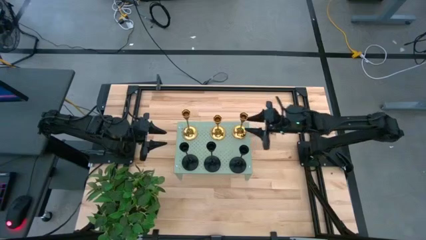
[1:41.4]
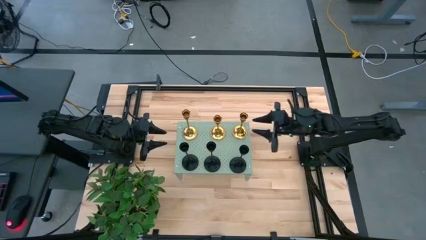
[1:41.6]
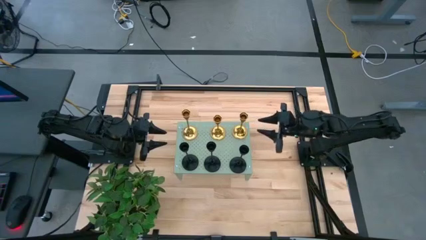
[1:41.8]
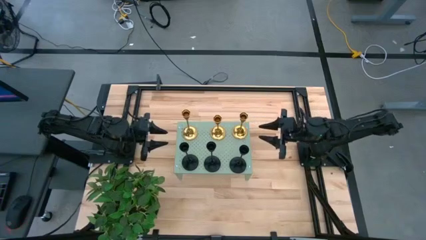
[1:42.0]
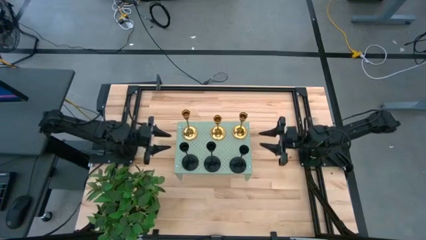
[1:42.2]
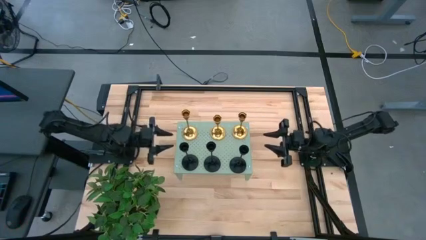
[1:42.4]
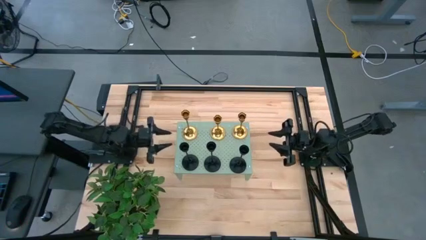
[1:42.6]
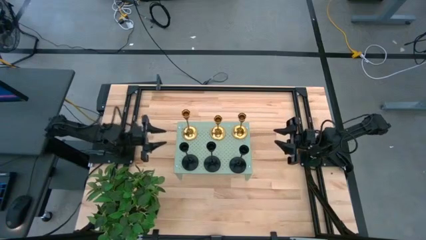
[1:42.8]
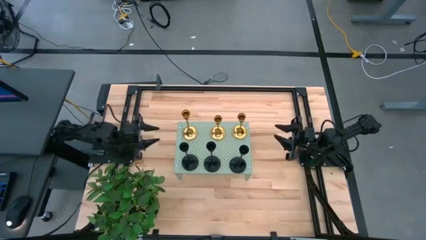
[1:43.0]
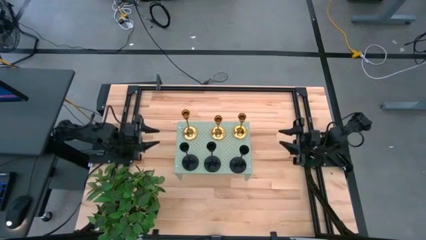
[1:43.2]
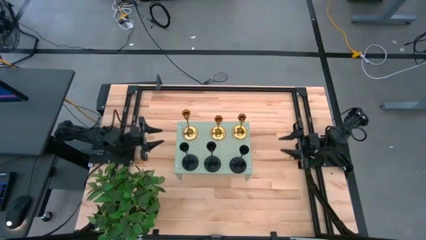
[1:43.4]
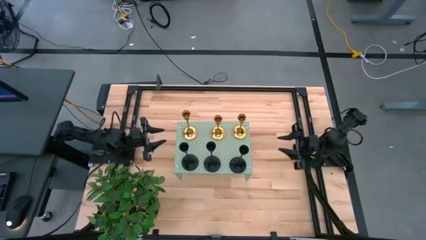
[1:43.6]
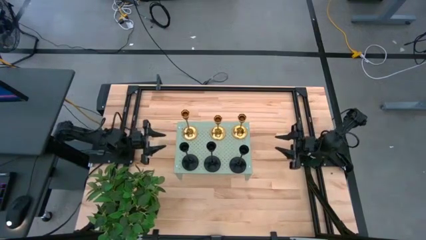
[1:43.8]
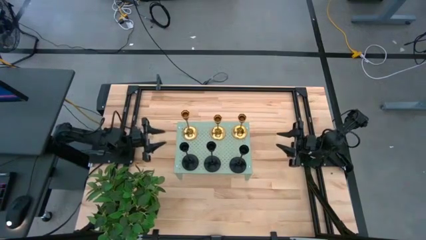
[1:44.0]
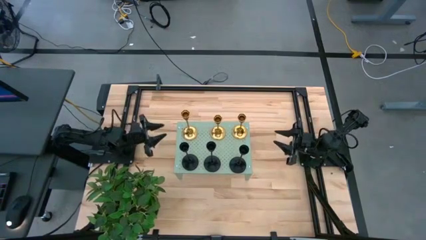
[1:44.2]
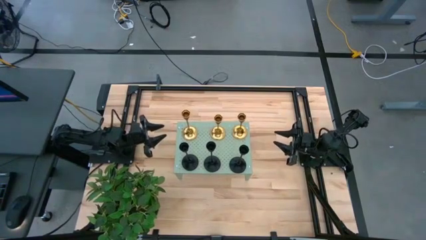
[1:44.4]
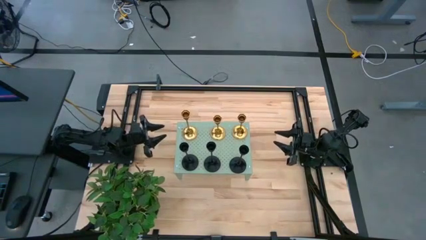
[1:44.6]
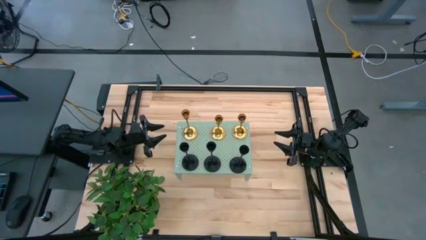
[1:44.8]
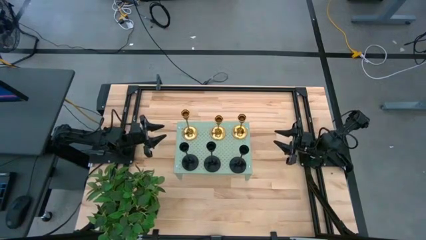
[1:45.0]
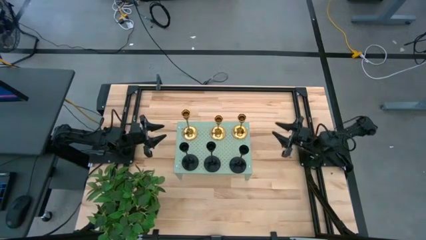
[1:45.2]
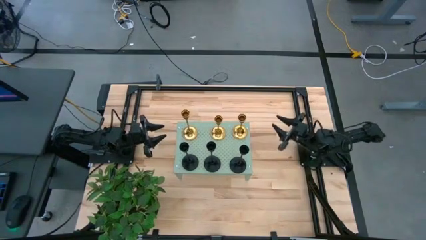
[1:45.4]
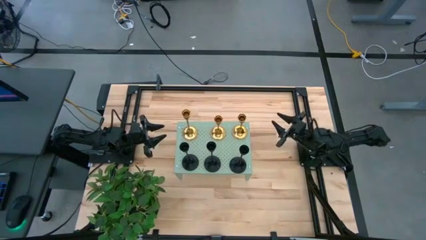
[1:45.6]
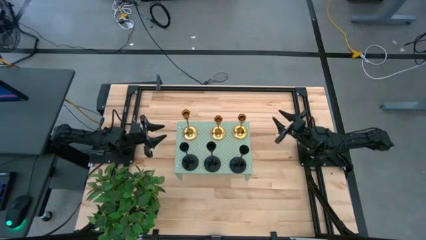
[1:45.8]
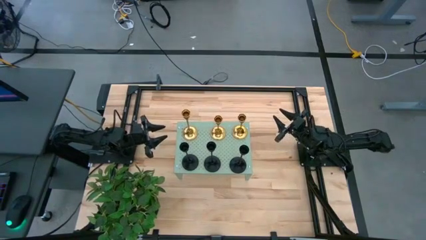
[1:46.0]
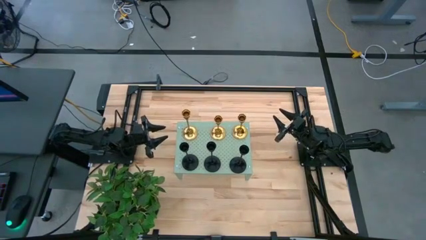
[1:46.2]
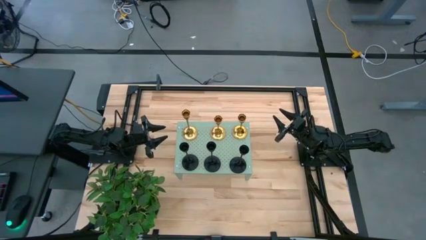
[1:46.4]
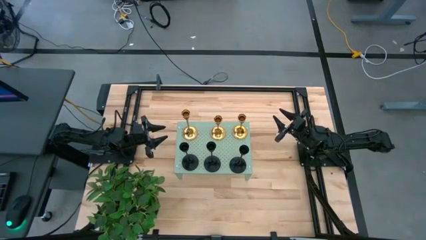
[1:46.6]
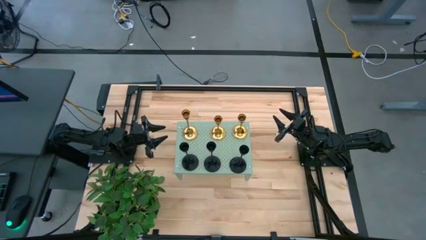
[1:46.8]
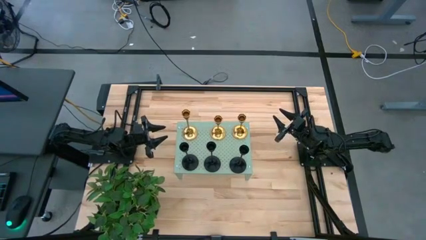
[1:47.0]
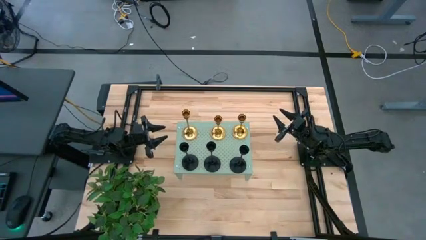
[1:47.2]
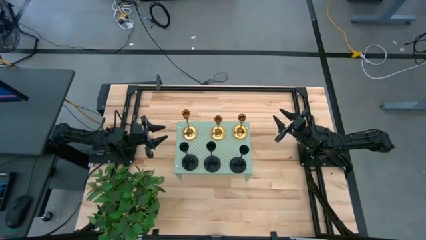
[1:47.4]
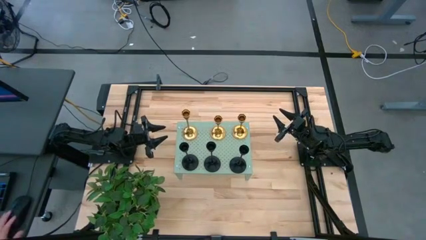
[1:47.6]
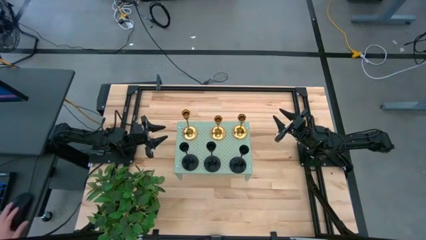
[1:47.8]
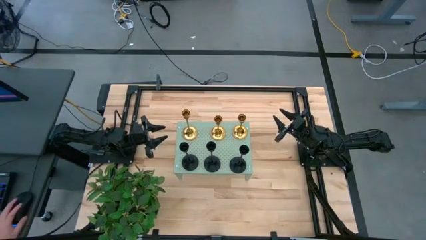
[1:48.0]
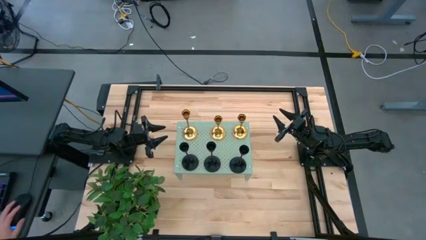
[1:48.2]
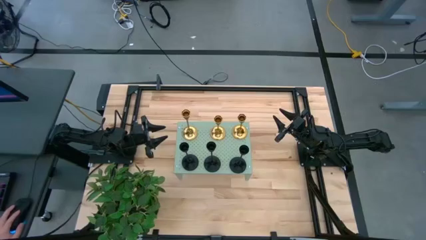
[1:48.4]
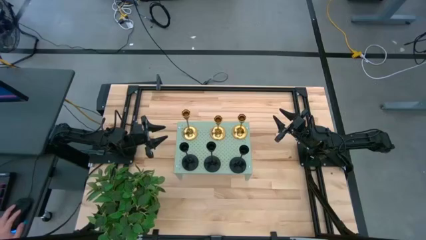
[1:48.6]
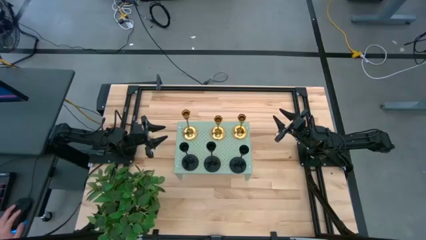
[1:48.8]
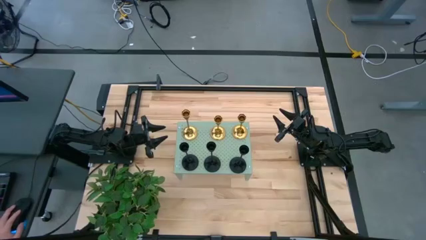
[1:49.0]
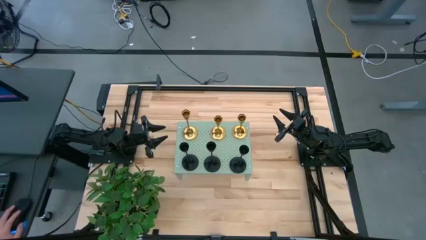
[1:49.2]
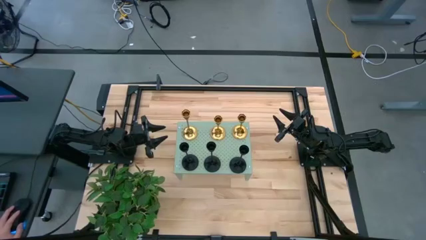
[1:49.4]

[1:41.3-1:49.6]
Task: Pick & Place candle stick holders
Return to Home Position

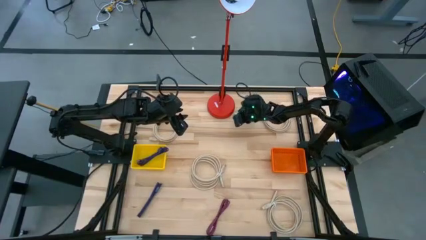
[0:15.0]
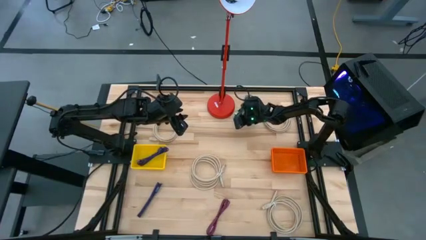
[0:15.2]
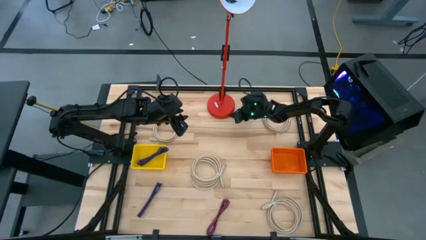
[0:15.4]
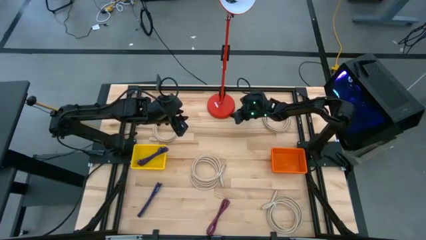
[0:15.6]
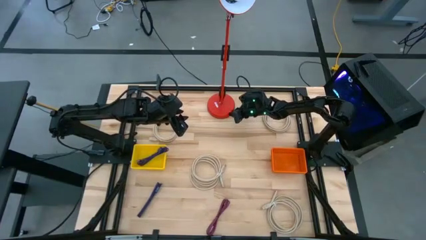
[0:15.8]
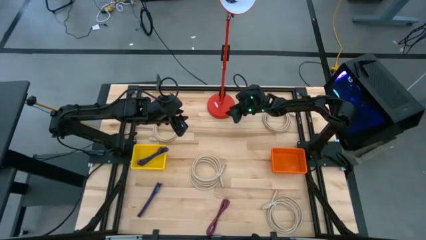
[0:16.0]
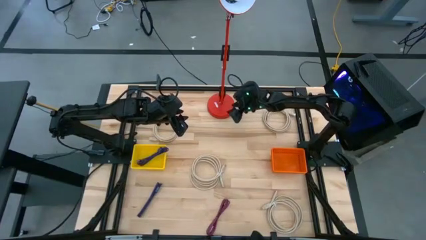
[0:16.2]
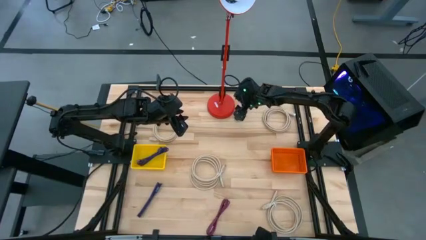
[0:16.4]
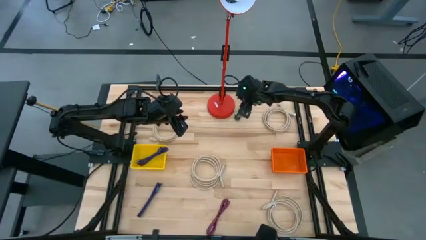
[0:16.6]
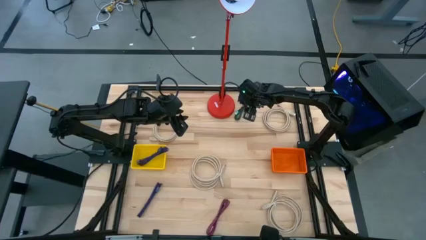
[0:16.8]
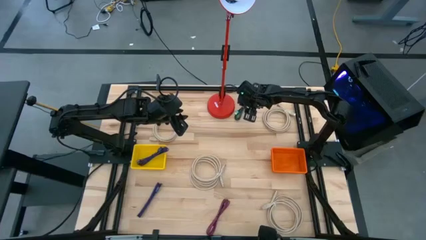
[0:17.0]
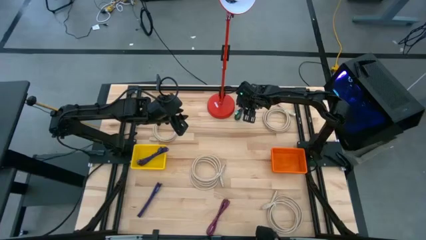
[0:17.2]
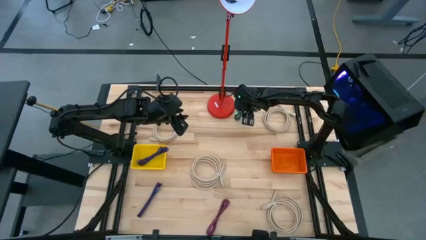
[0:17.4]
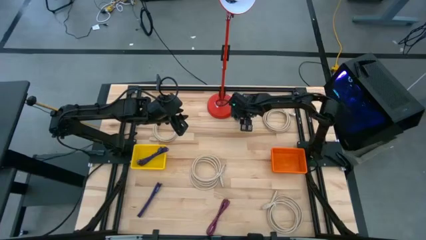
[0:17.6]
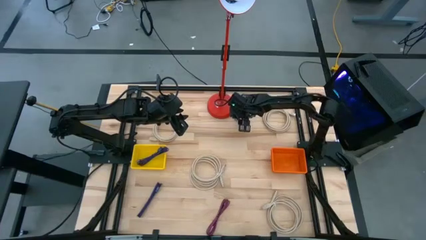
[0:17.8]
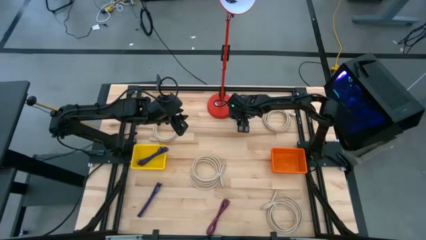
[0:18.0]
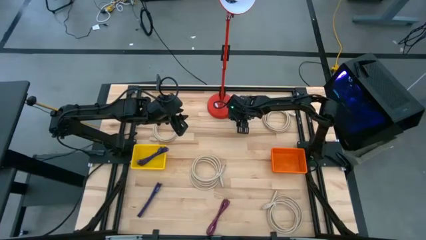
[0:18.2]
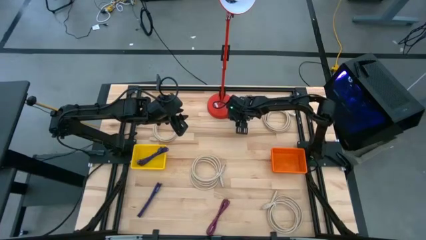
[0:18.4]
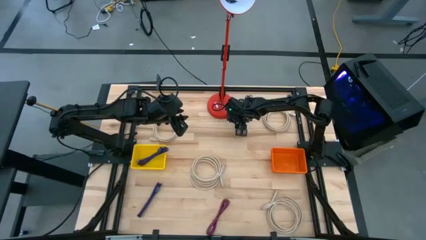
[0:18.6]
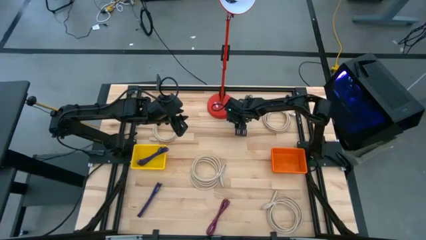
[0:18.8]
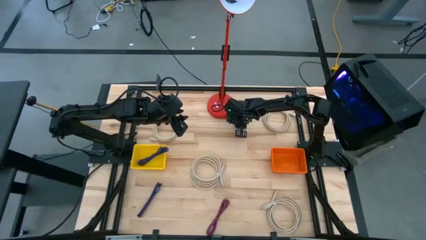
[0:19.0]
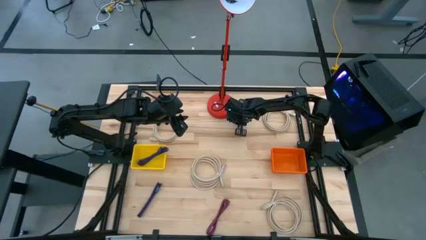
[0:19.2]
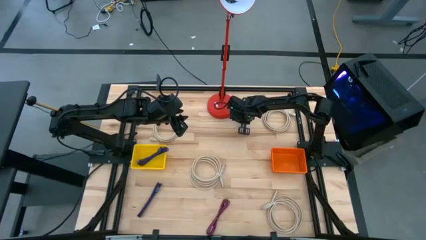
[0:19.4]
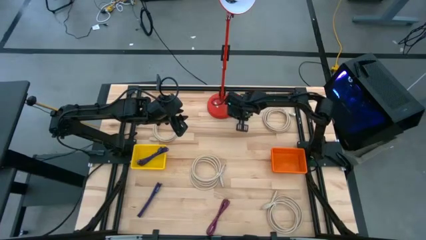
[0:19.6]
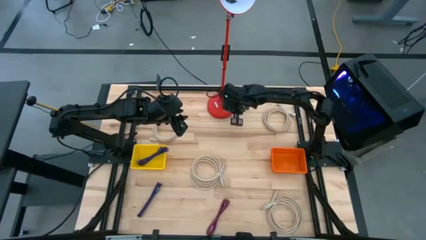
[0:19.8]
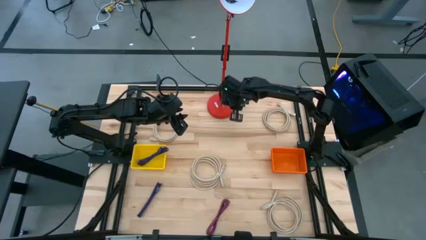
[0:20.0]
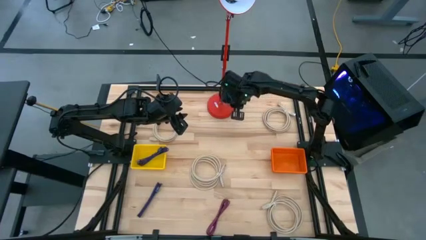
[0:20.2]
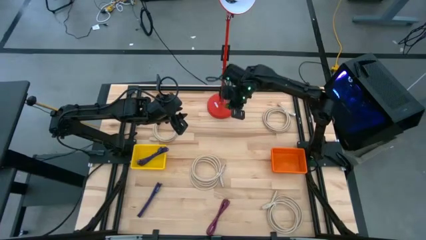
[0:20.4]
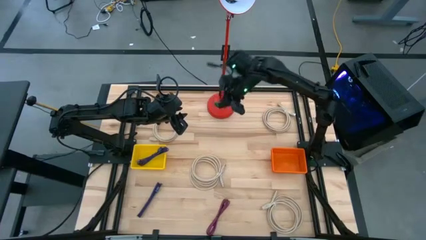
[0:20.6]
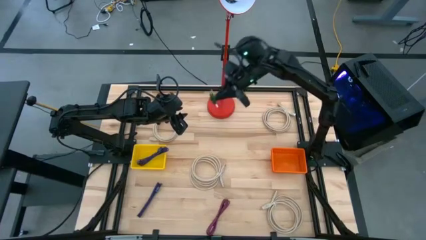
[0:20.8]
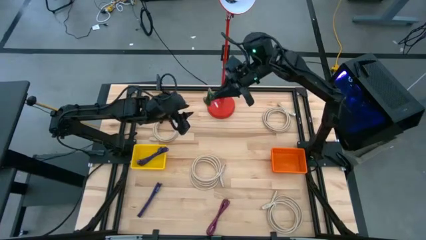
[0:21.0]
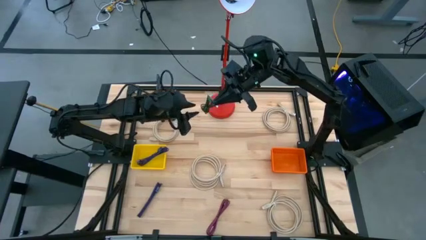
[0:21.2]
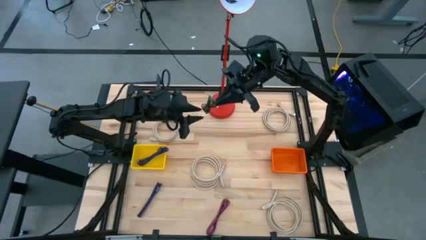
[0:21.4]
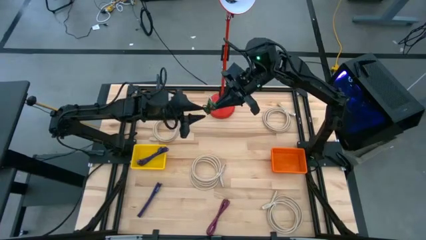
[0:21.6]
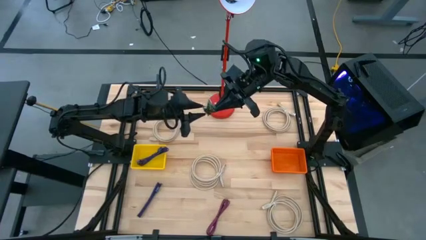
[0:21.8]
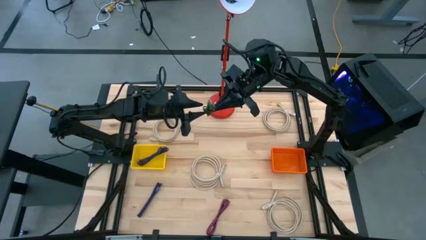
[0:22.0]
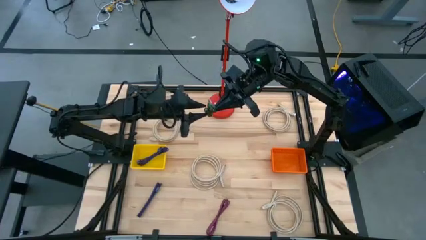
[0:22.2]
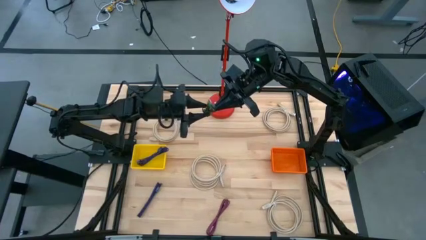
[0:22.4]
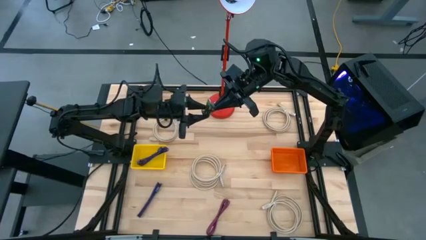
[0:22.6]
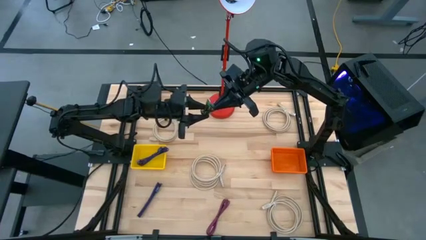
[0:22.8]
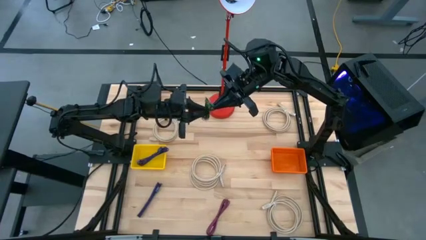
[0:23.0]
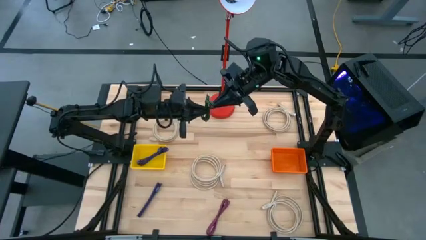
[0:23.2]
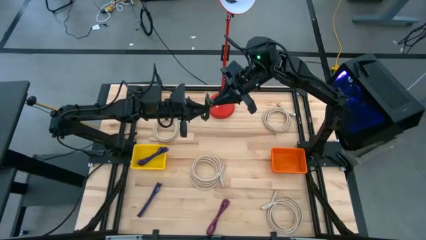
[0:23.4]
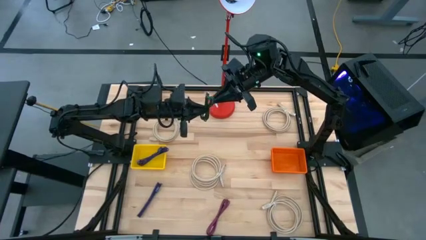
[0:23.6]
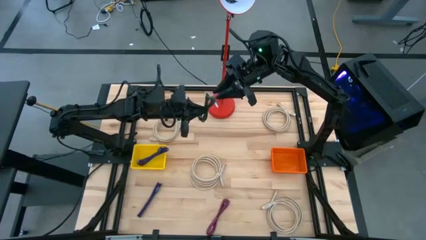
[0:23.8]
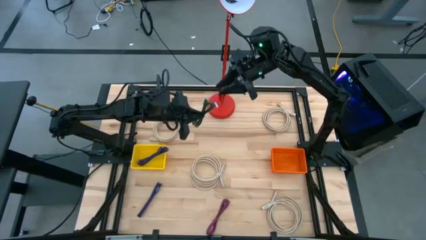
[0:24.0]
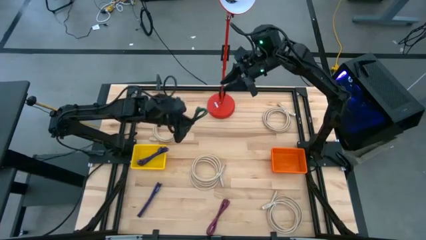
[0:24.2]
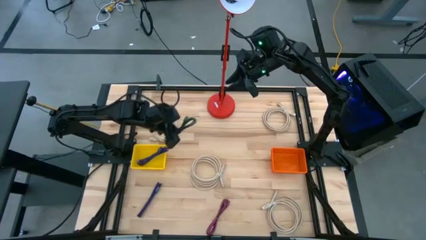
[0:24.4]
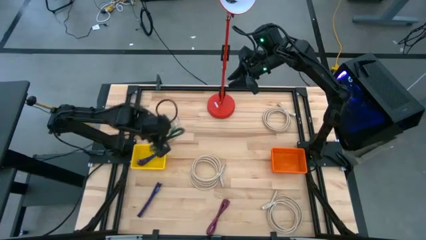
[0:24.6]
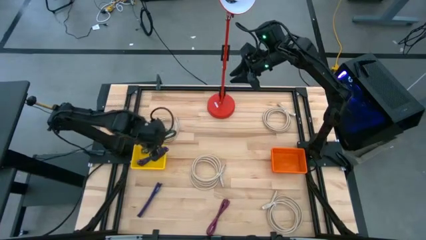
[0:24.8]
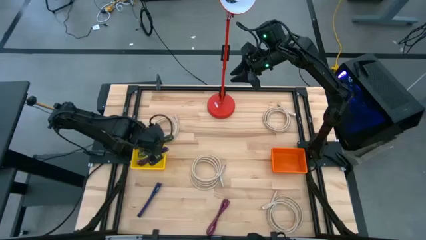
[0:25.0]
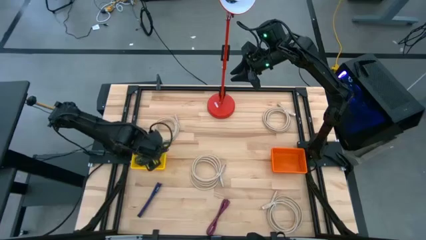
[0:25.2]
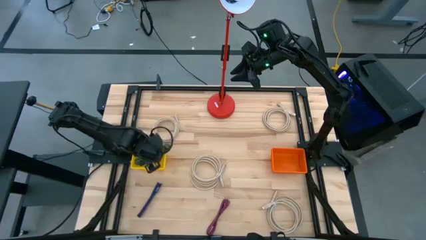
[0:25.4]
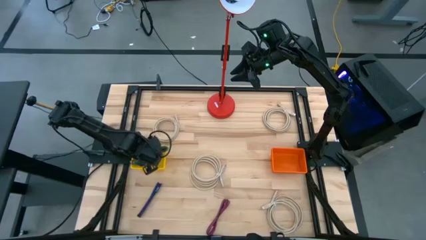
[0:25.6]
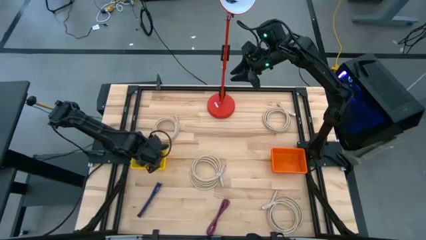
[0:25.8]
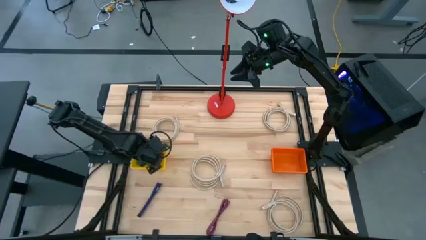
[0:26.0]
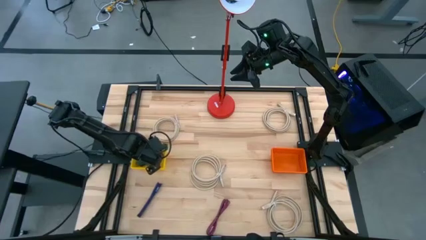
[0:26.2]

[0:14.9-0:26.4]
Task: Pick & Place USB Port
Put the black and green charger cable into the yellow bin
